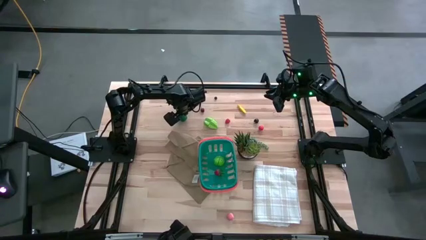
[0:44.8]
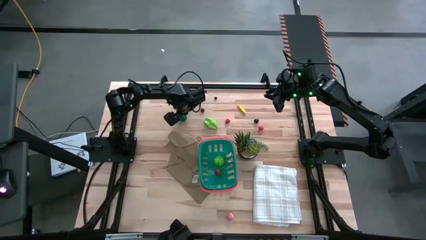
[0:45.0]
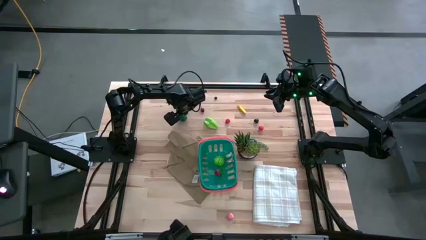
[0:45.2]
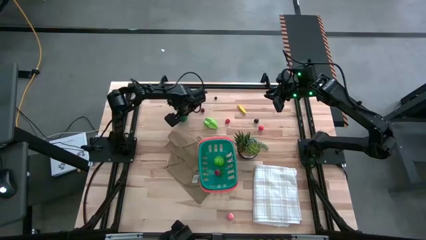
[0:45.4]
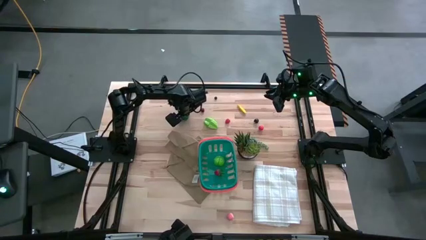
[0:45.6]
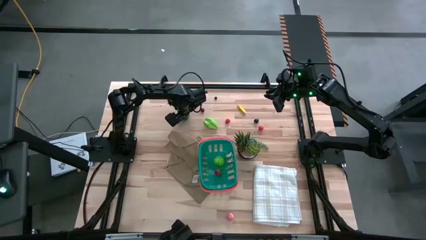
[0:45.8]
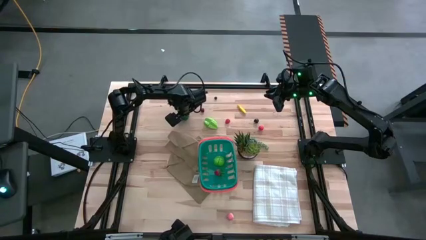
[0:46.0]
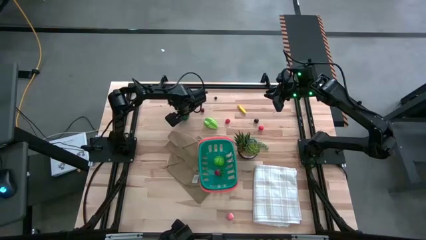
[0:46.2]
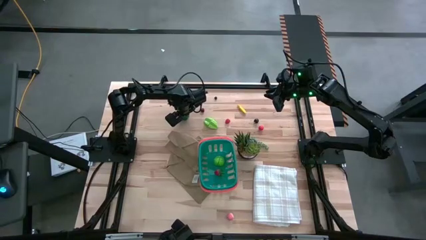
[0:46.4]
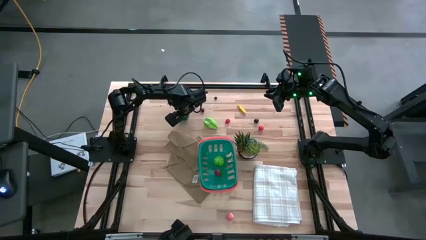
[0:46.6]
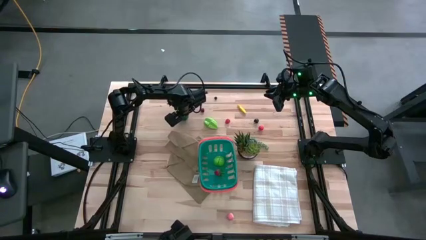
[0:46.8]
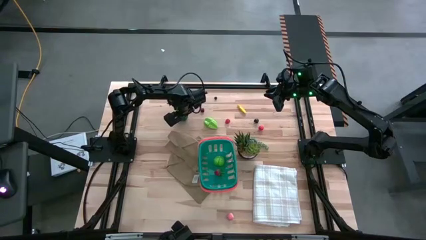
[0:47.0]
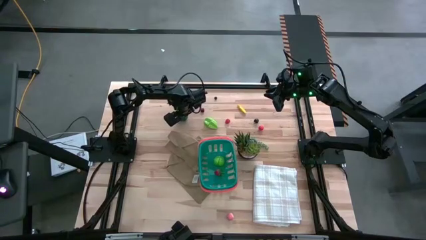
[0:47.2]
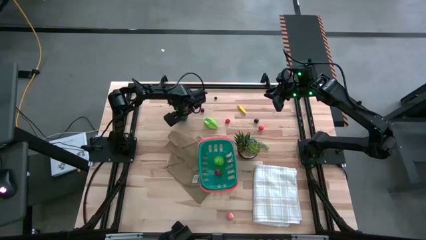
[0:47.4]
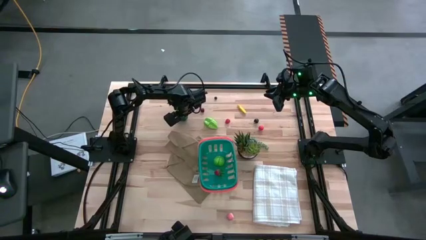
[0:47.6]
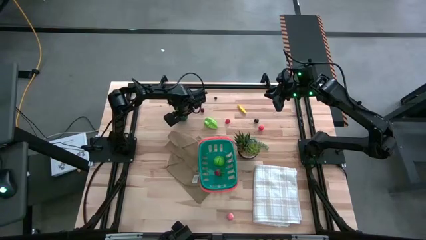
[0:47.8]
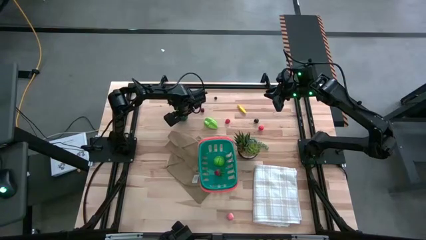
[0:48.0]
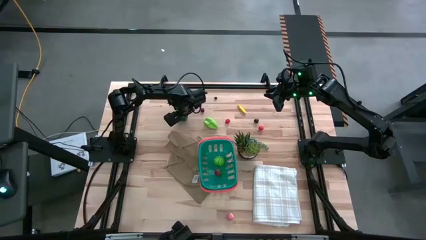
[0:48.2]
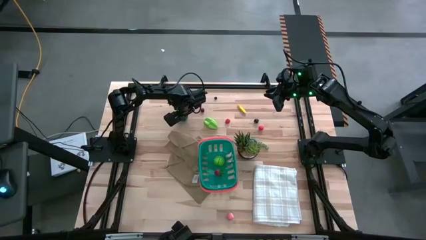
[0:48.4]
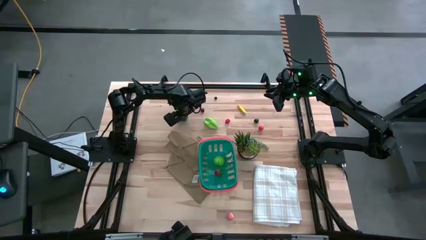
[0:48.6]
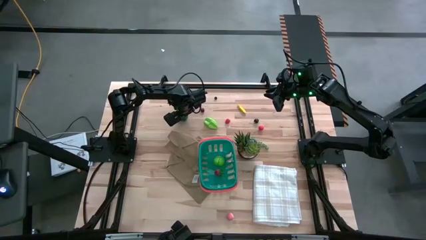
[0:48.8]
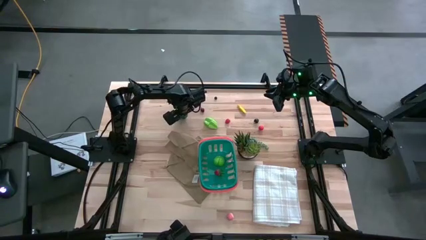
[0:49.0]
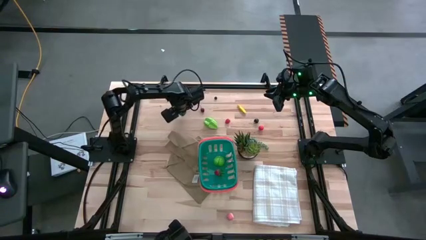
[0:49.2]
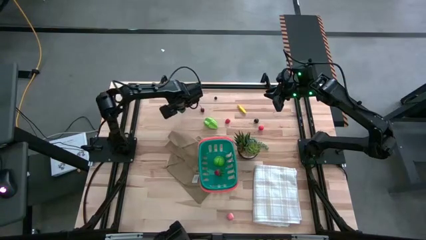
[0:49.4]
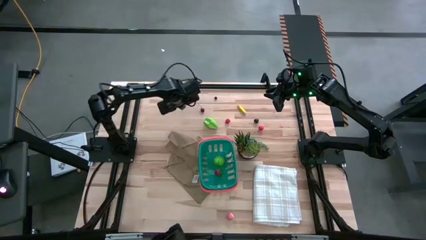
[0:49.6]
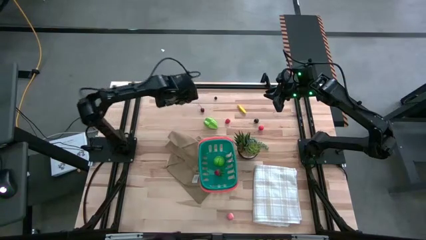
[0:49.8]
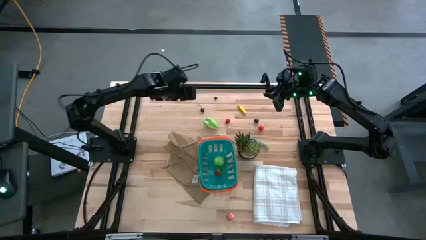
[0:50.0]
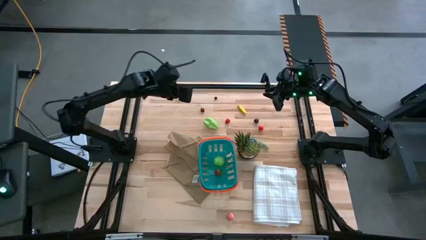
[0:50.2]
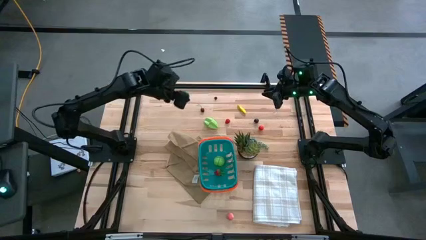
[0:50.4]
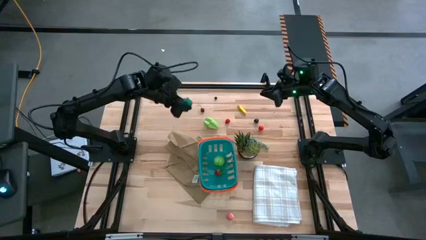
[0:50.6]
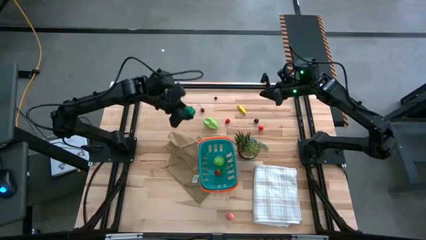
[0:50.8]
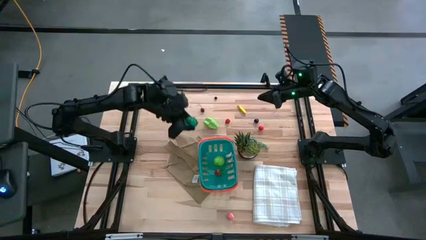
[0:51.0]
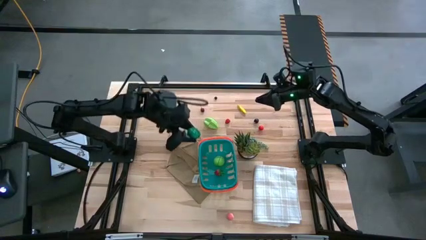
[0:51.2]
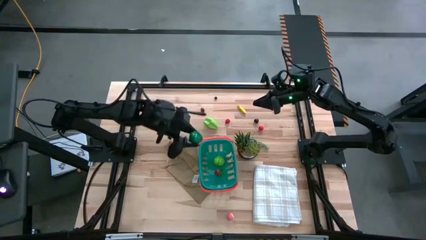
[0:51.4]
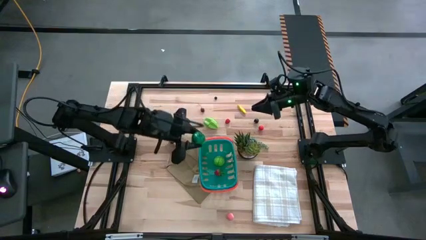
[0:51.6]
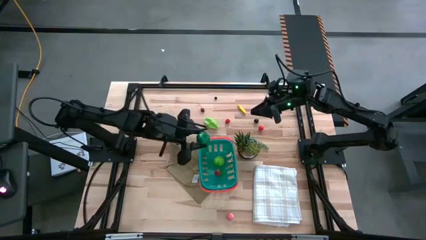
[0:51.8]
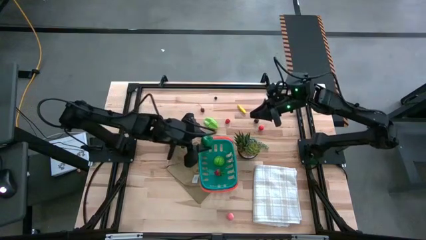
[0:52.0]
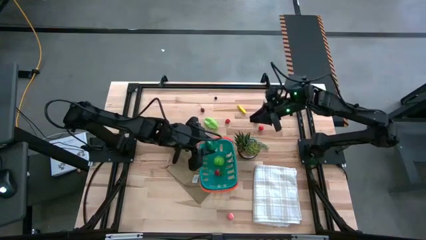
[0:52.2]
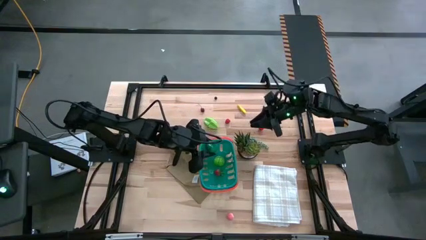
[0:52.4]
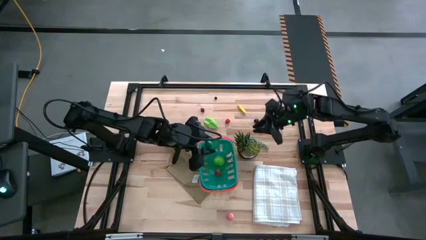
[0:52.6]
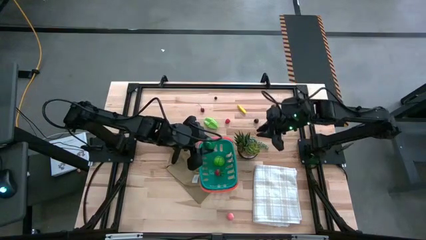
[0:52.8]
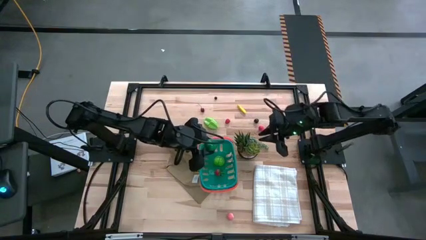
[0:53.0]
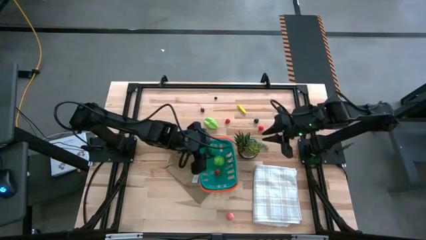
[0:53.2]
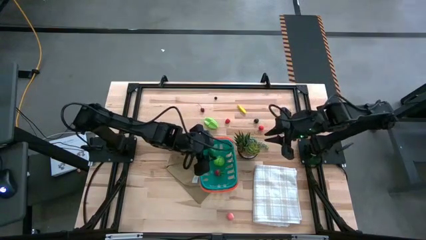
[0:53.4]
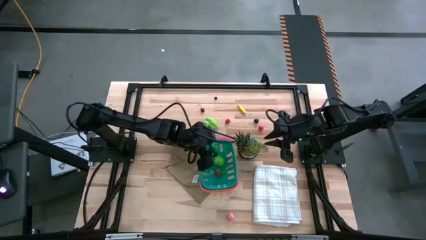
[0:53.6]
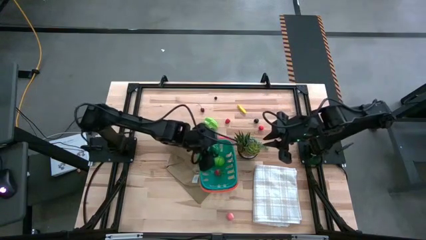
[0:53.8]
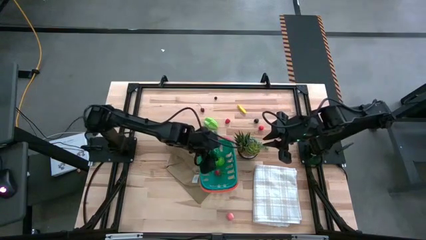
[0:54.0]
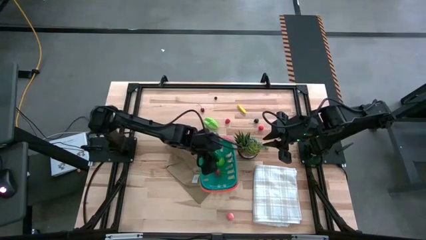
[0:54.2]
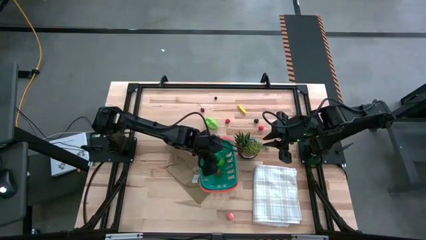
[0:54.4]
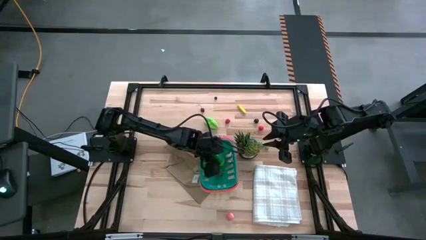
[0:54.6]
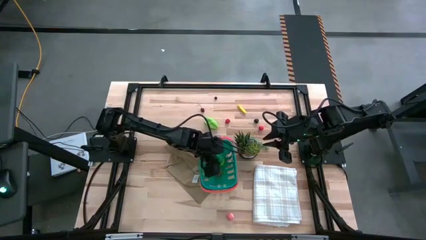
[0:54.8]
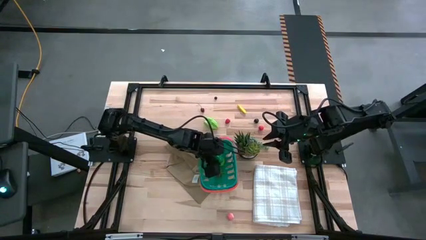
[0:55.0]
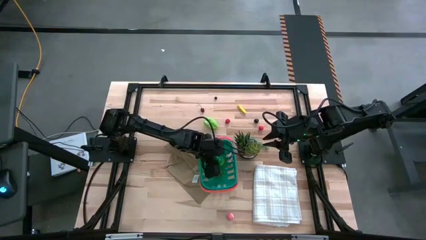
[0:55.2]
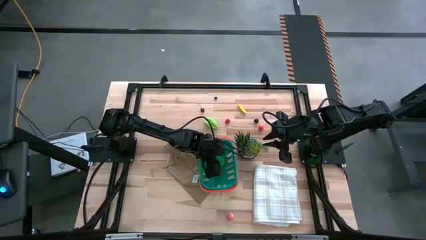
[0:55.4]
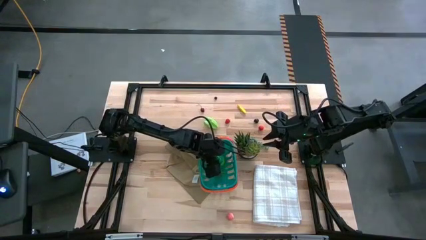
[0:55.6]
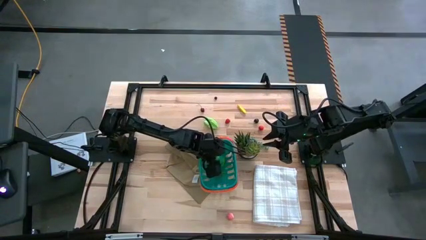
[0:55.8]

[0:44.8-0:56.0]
Task: Pick and placing Produce into tupperware
Put the green bell pepper into the green basket
